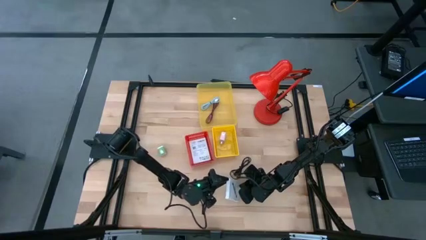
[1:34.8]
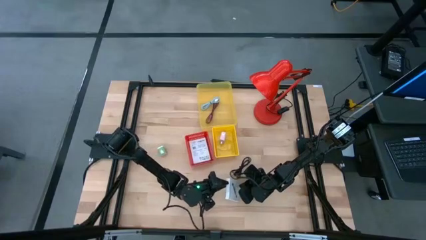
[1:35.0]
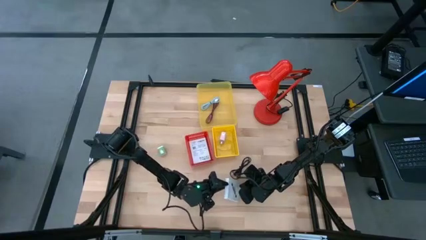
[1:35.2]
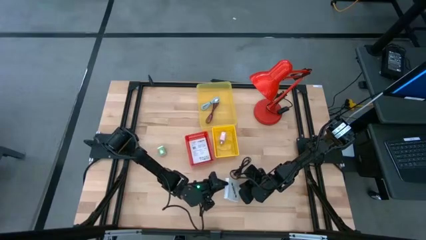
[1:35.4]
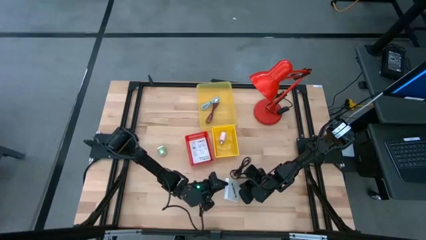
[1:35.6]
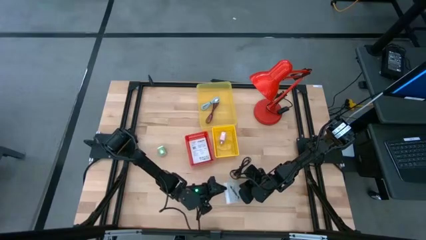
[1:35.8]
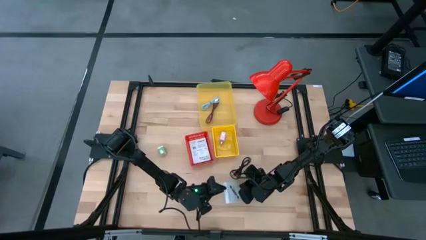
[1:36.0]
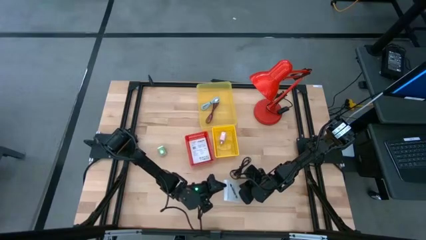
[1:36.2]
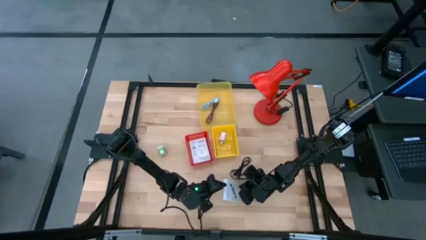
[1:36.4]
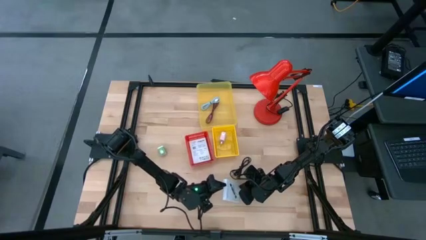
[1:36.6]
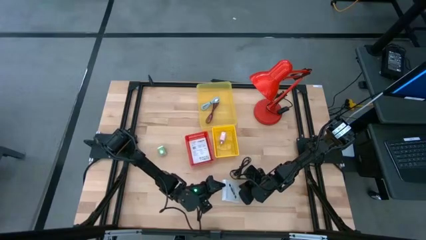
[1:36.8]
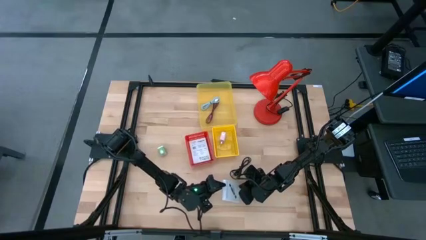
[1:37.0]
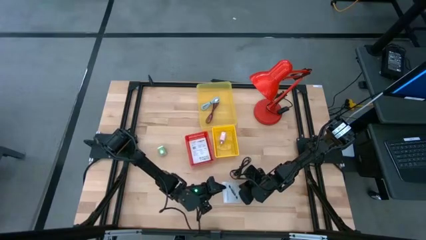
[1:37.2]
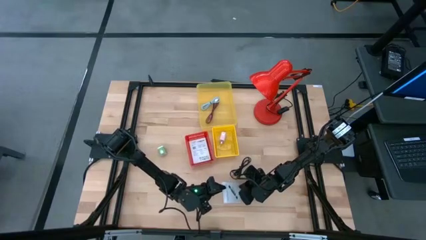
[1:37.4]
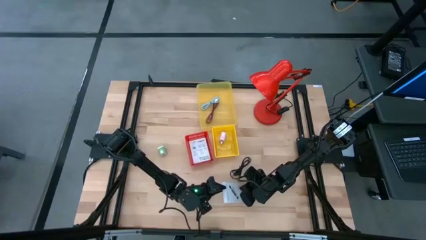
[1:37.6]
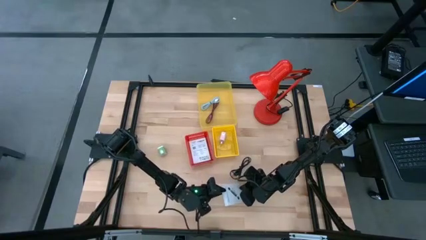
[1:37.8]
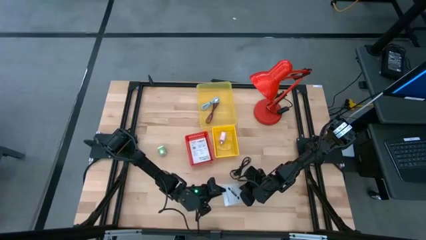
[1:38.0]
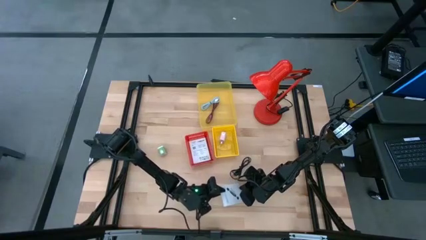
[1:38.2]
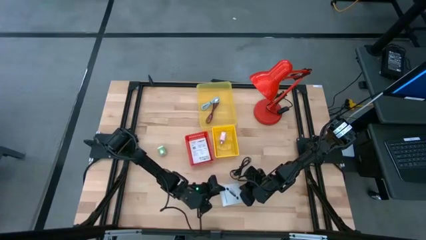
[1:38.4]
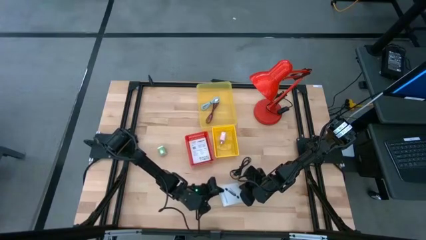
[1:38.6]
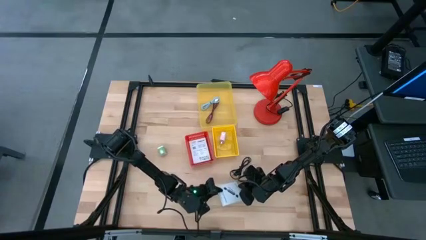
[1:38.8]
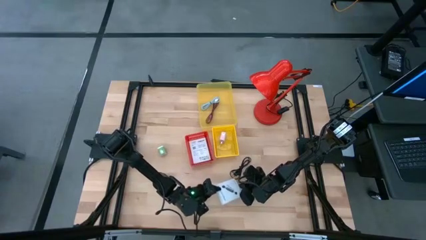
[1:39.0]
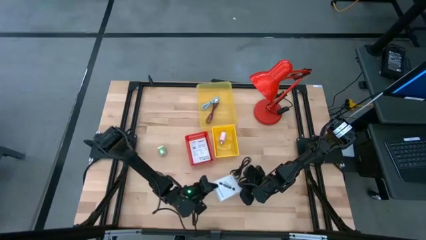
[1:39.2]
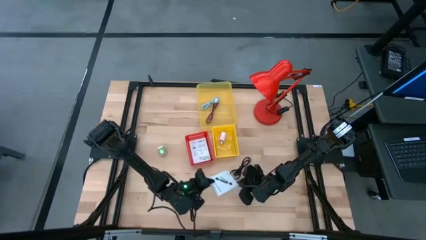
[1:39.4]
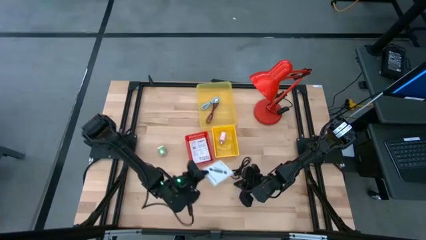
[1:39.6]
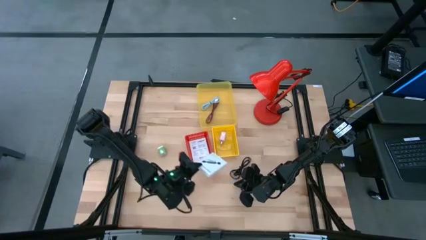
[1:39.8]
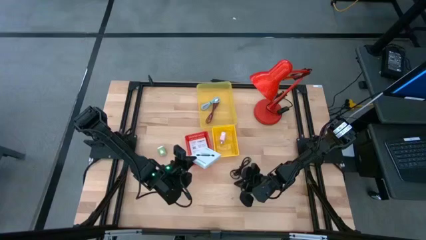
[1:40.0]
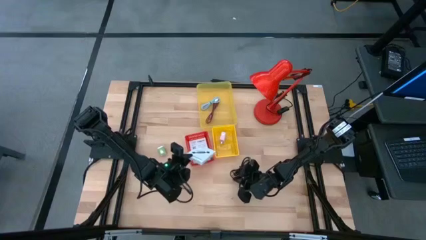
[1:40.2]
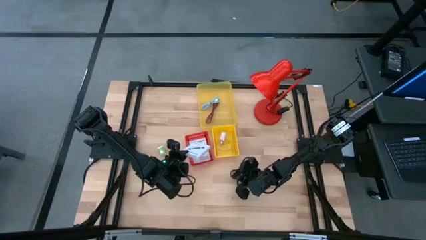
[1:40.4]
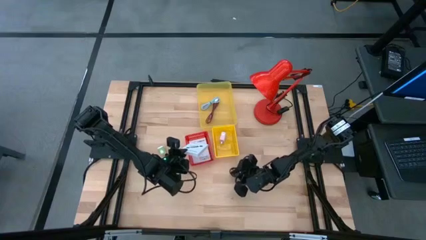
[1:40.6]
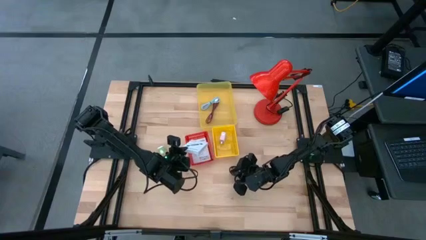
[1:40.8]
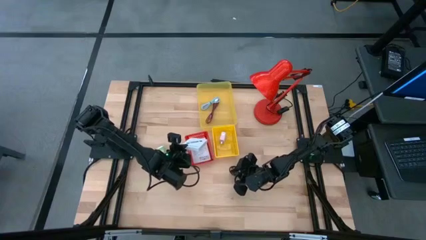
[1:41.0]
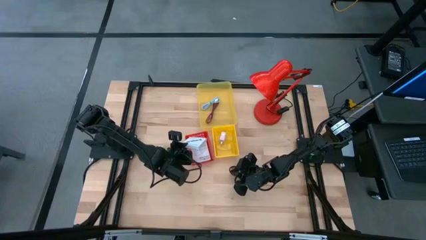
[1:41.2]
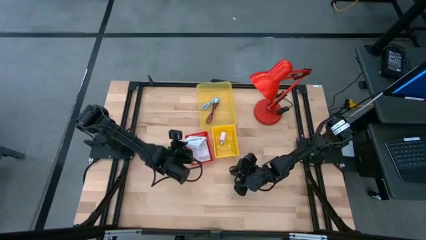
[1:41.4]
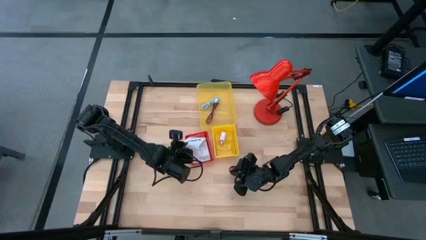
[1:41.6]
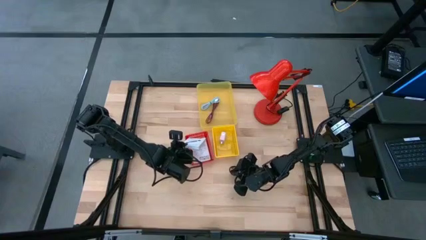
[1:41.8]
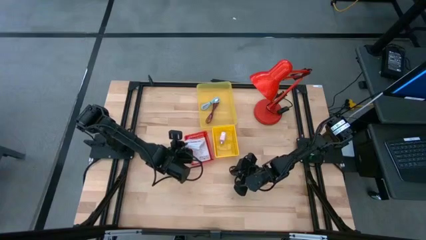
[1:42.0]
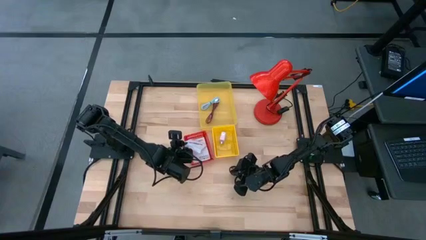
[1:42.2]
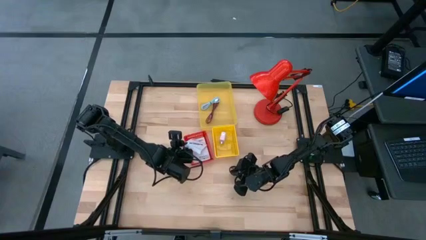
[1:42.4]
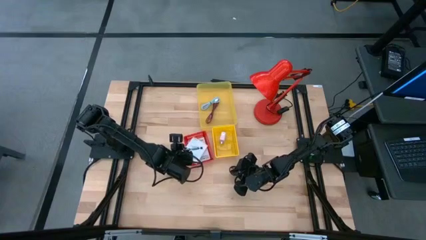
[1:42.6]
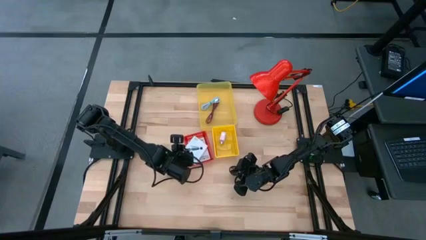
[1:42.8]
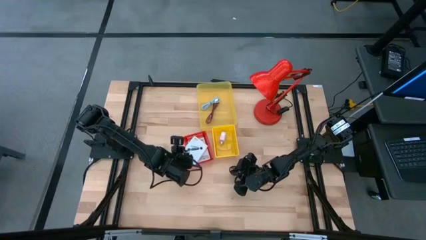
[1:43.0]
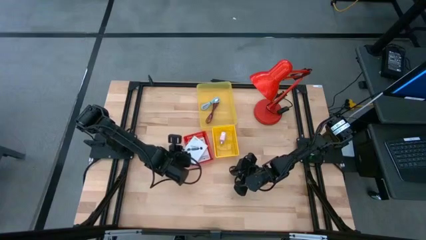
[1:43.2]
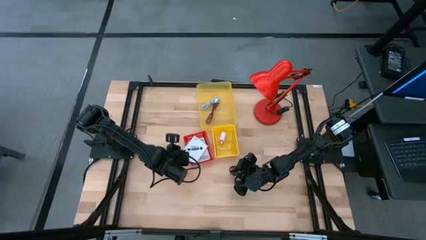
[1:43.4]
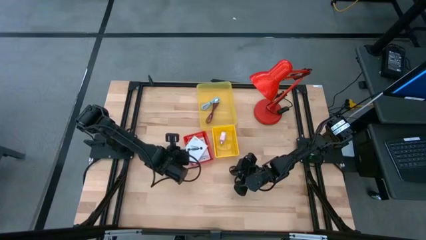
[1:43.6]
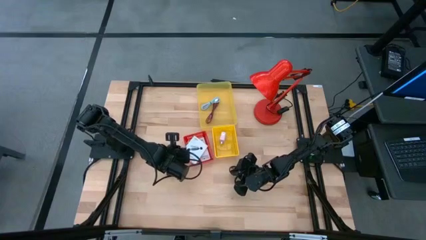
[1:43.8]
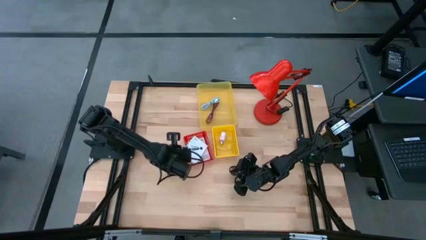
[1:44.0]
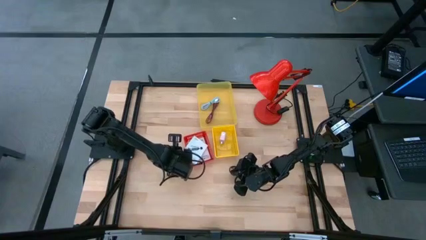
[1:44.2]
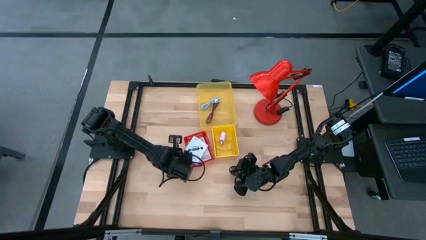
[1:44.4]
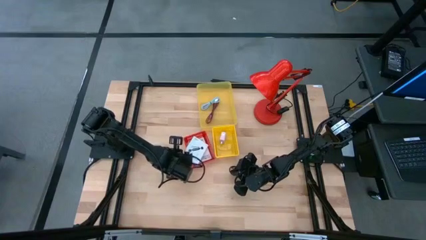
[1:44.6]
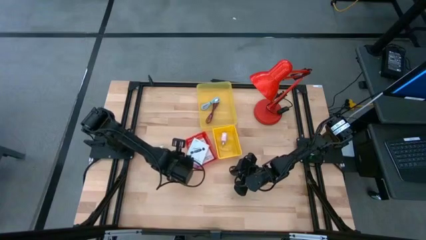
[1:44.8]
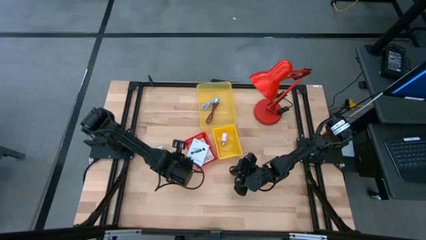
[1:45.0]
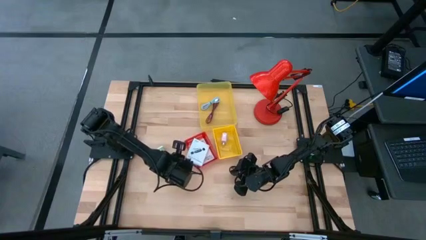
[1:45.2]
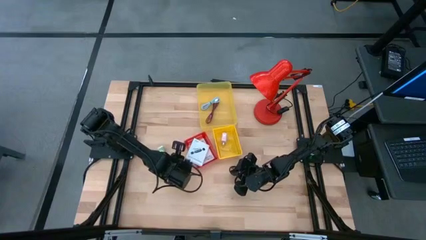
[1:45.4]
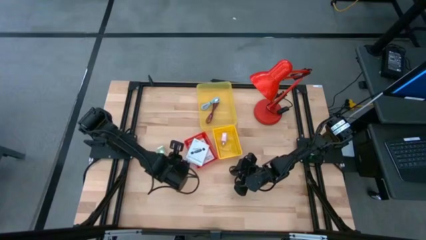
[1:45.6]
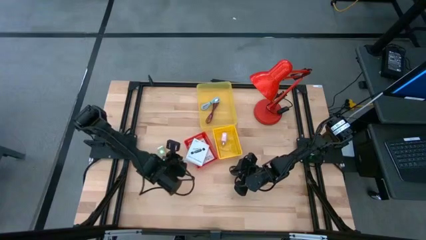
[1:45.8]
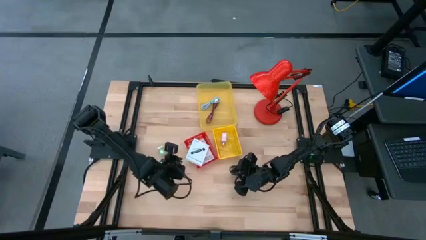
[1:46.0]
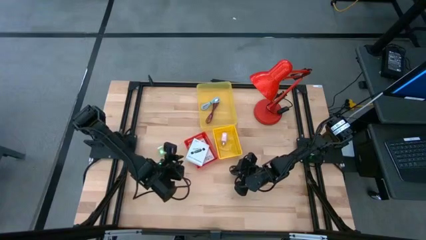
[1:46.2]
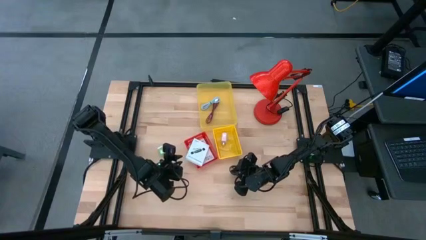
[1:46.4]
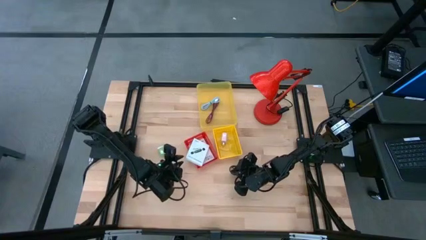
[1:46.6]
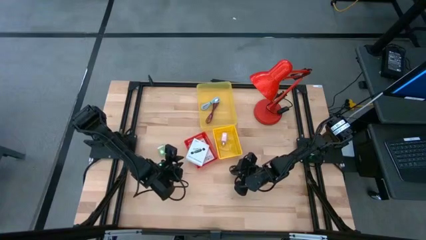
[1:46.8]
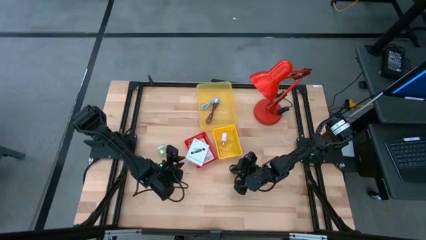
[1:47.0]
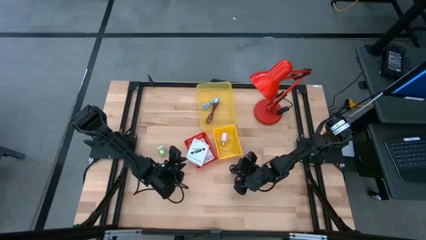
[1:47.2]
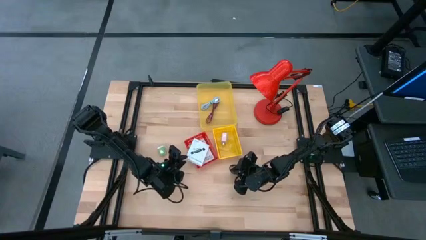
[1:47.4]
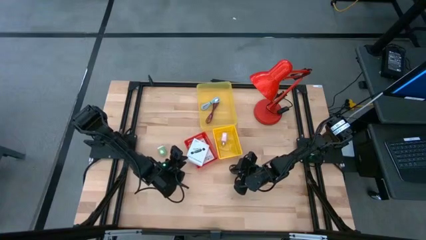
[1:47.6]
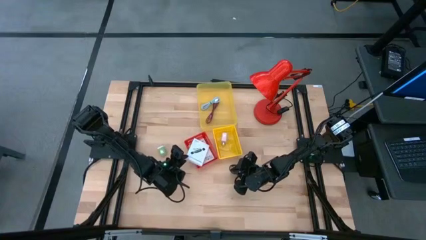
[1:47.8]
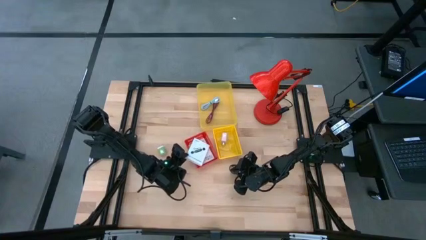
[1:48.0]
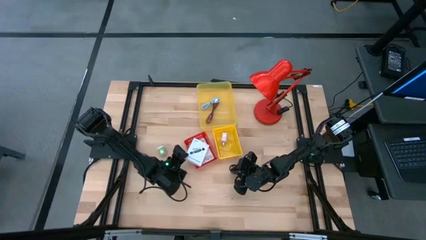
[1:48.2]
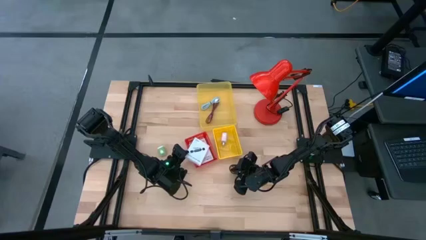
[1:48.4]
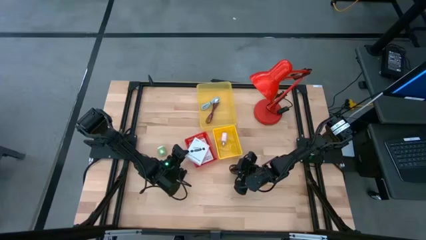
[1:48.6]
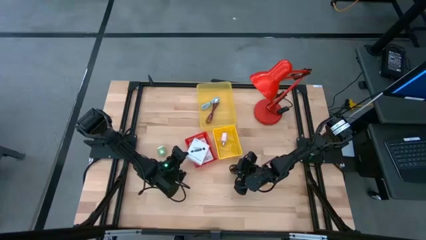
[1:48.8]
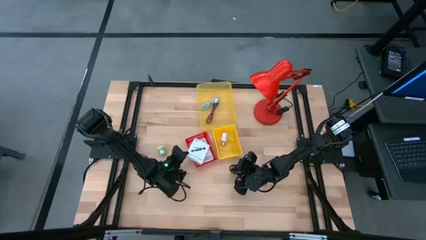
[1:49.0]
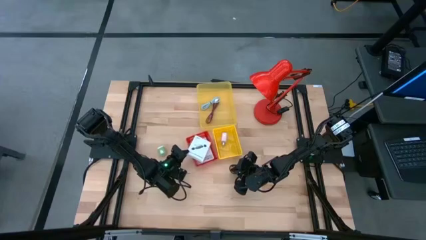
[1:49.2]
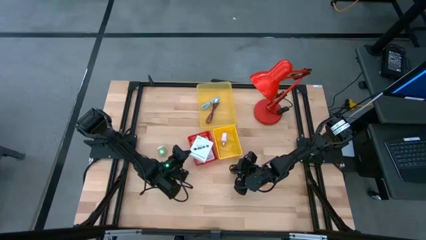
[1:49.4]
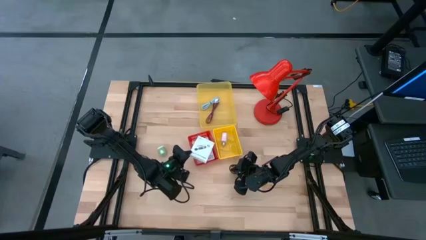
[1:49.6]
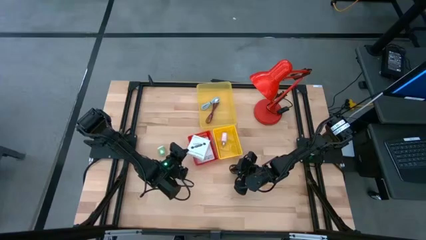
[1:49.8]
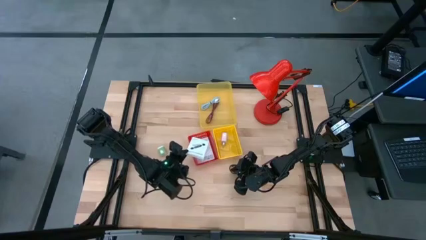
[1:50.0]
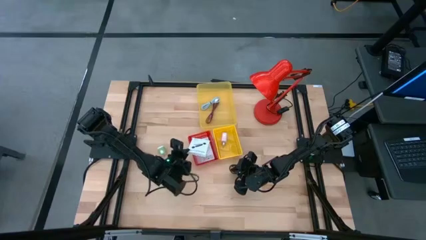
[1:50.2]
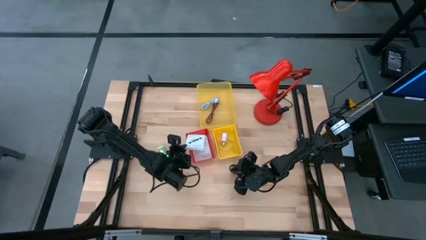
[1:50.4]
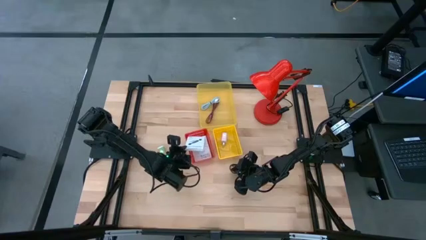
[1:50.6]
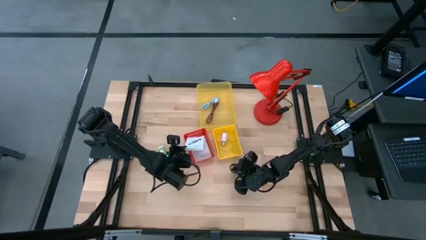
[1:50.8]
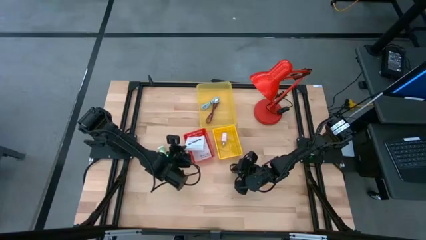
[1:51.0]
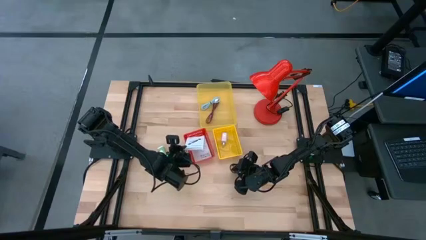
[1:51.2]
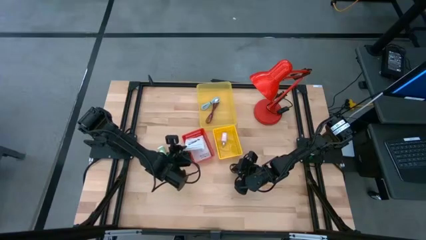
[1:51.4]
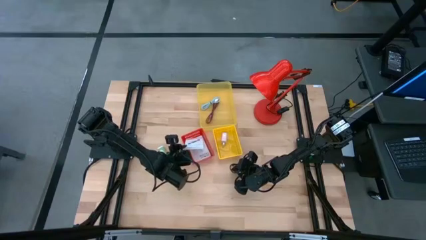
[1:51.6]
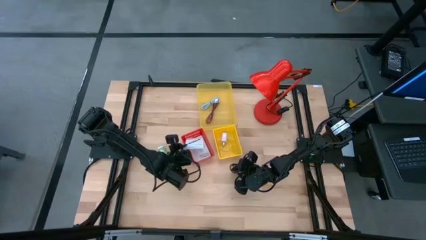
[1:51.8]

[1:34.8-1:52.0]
Task: Pick and place items into bin
Put the white card reader box into the red bin
